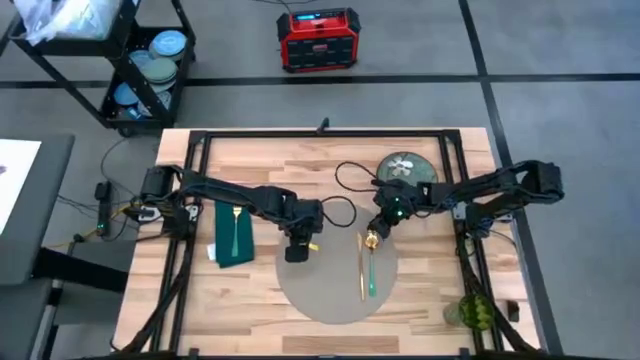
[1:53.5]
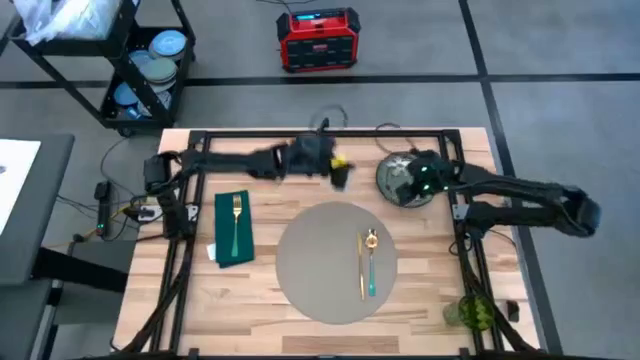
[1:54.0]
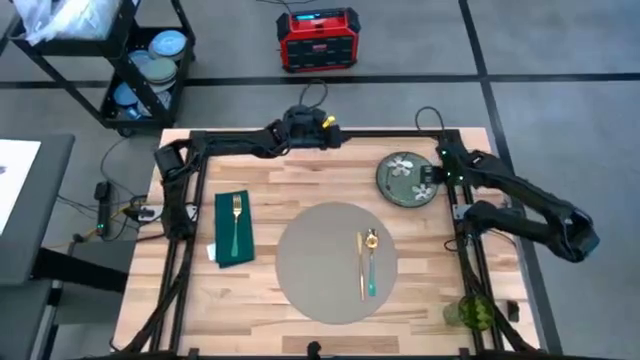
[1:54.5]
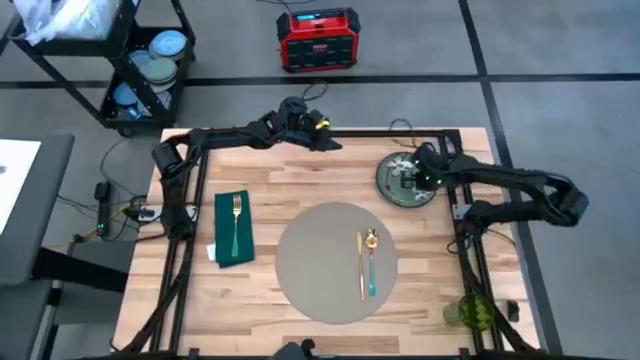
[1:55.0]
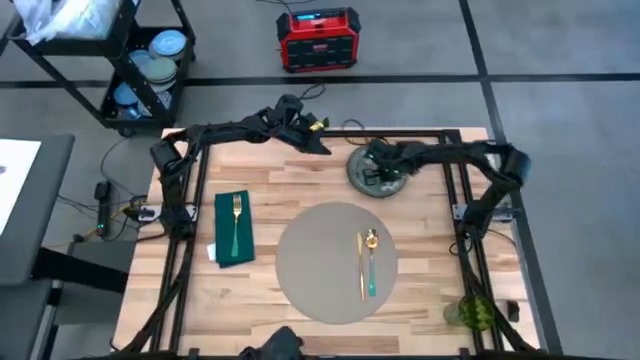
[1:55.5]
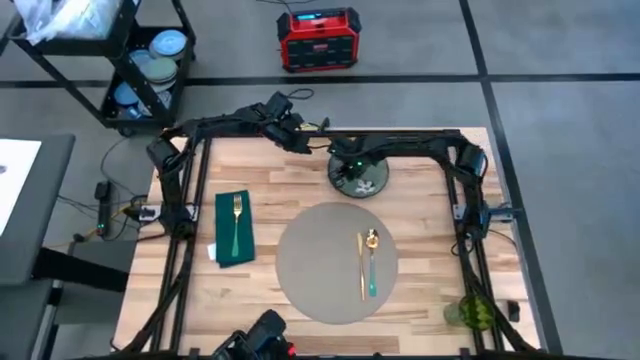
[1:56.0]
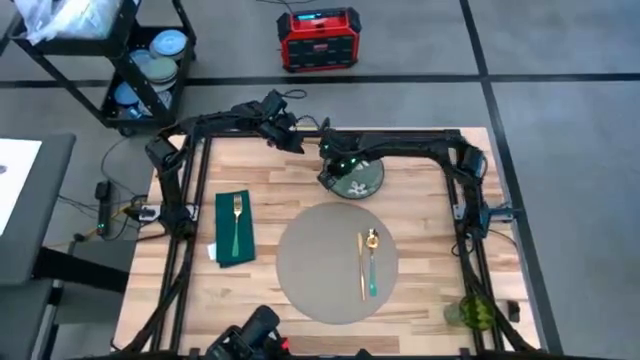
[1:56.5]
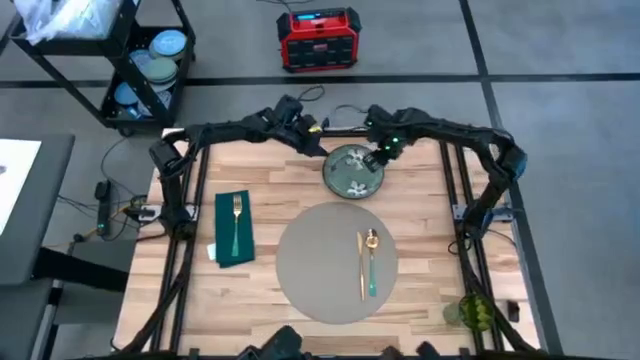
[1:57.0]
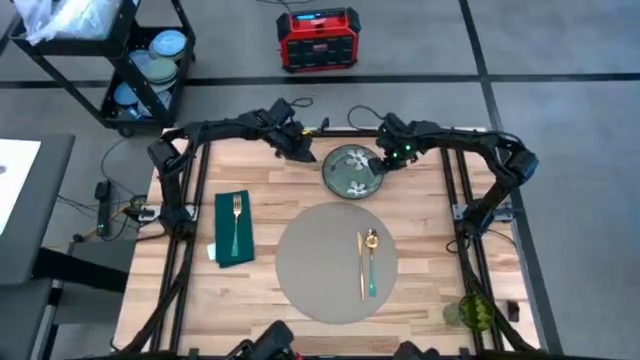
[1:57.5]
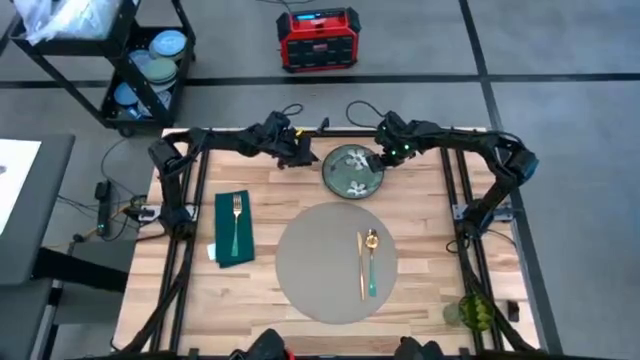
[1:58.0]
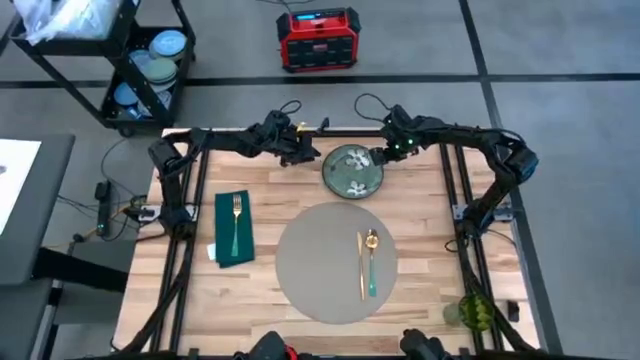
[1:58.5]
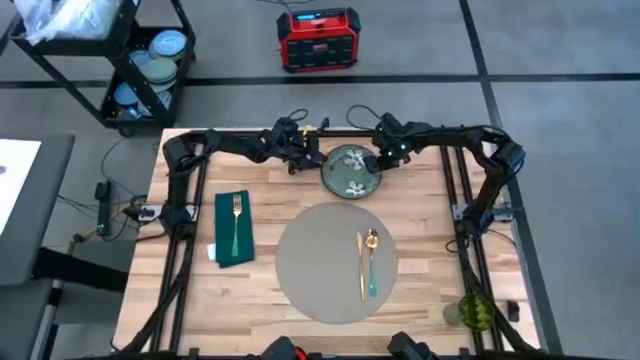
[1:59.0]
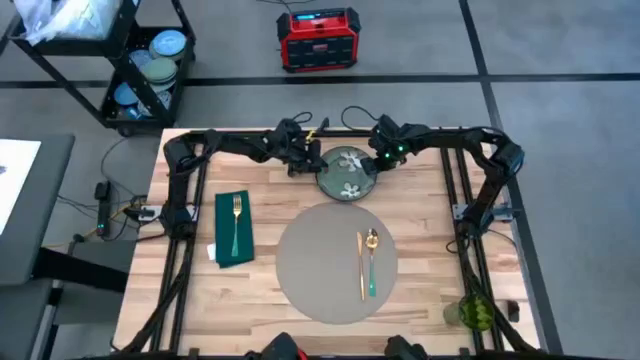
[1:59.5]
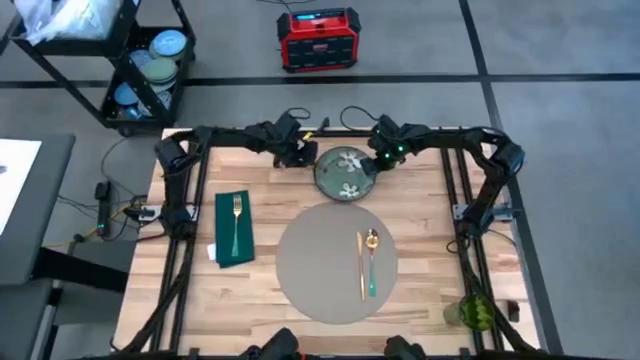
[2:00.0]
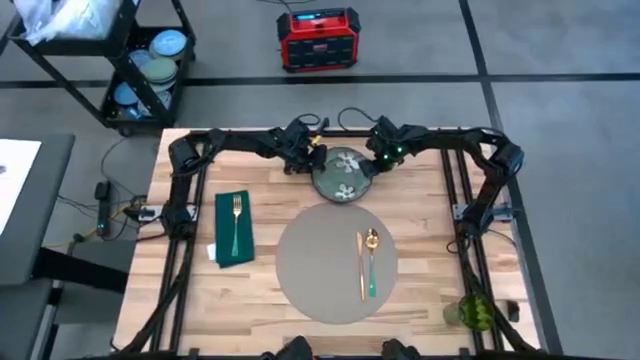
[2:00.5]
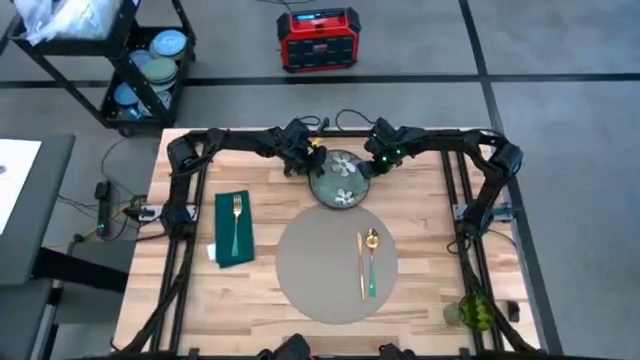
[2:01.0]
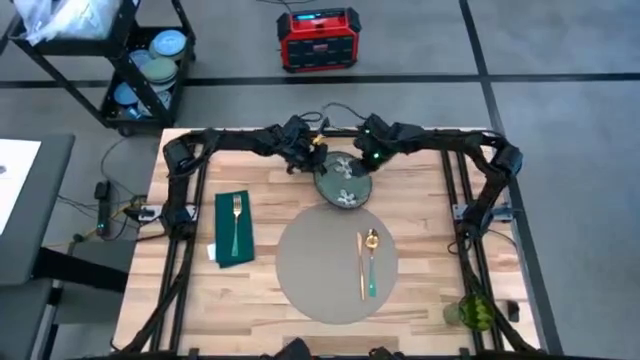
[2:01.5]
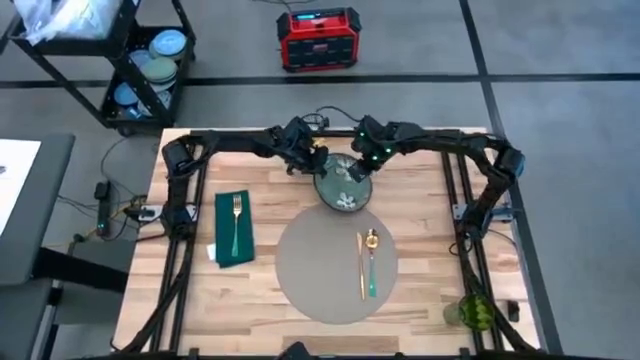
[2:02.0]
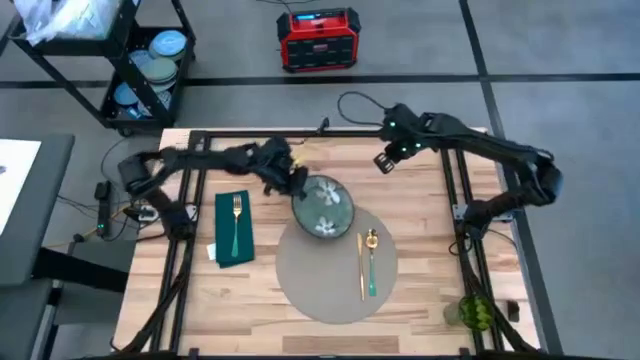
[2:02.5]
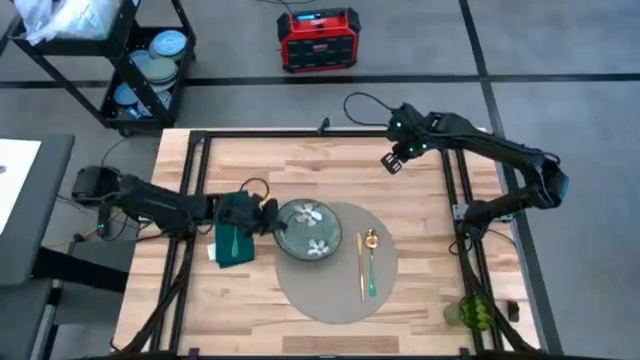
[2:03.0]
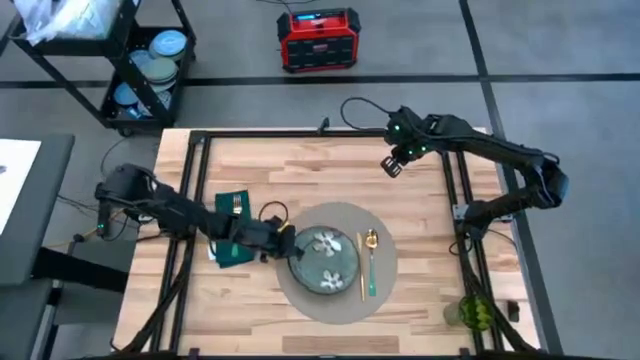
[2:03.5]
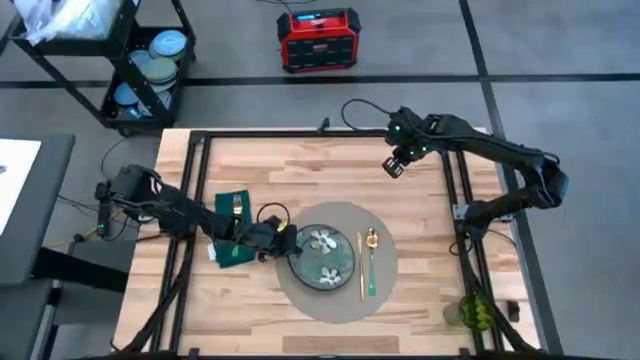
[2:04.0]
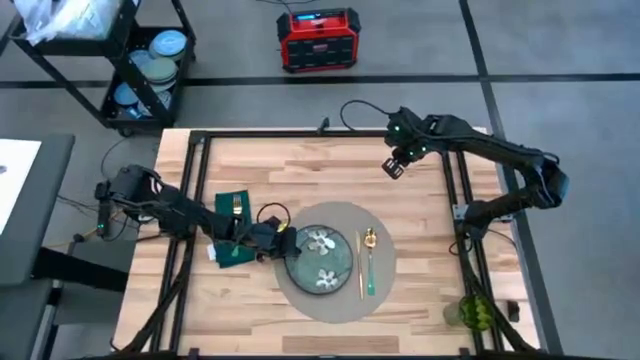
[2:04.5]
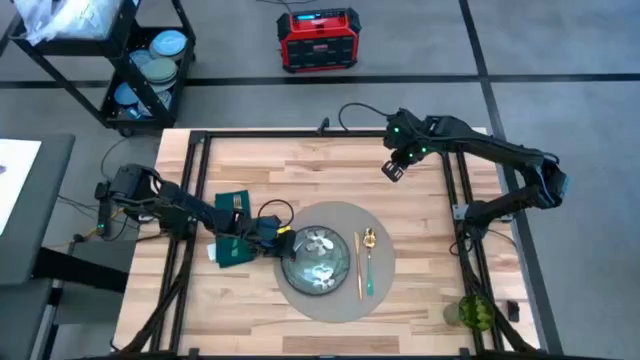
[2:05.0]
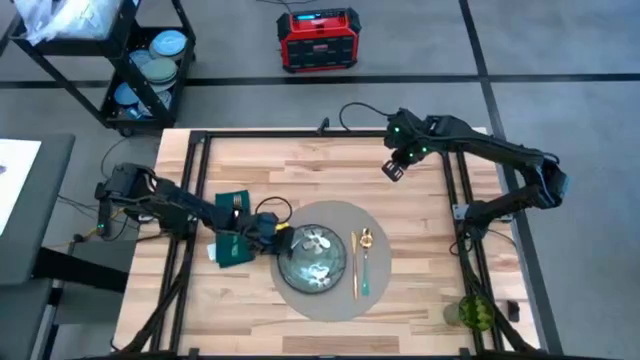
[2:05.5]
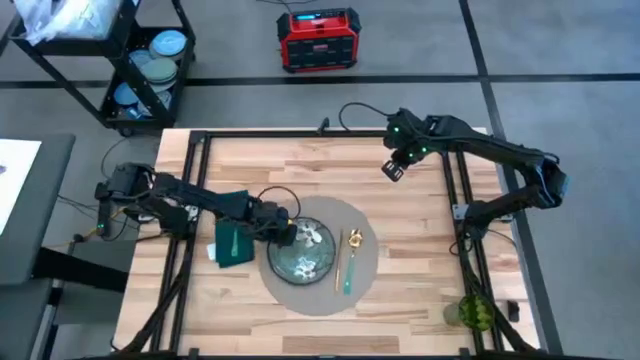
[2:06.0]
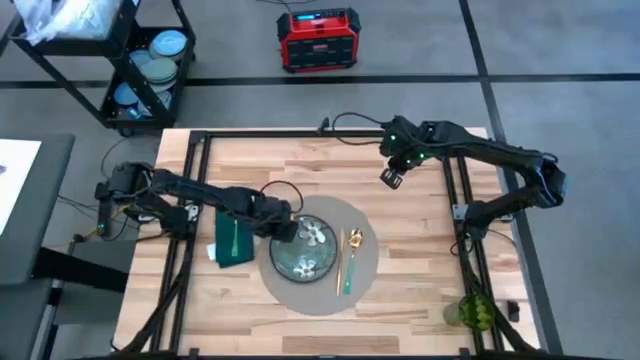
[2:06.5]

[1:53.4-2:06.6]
Task: Set table place
Put the green plate on the gray placemat

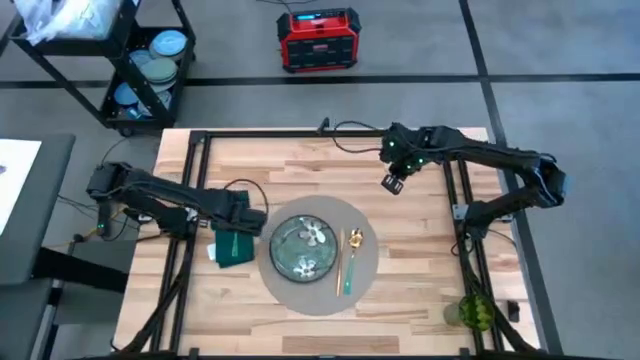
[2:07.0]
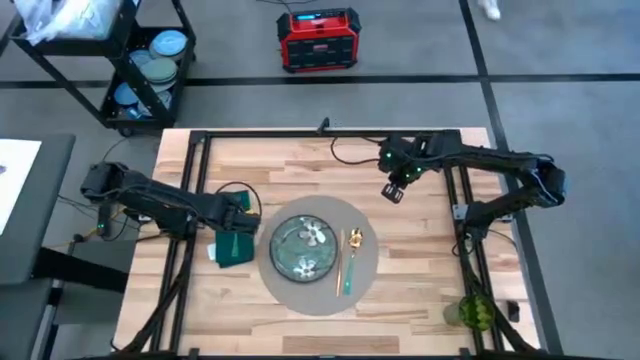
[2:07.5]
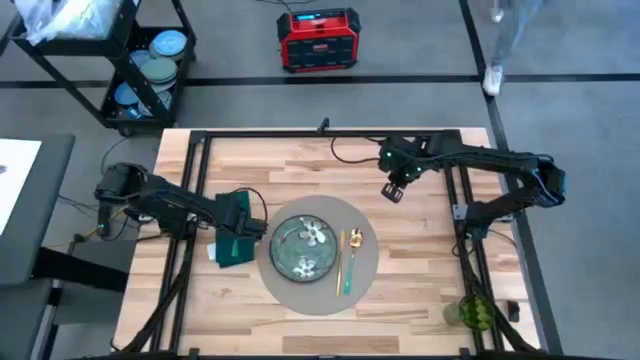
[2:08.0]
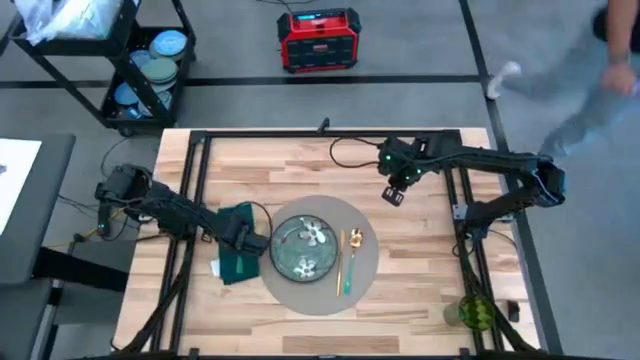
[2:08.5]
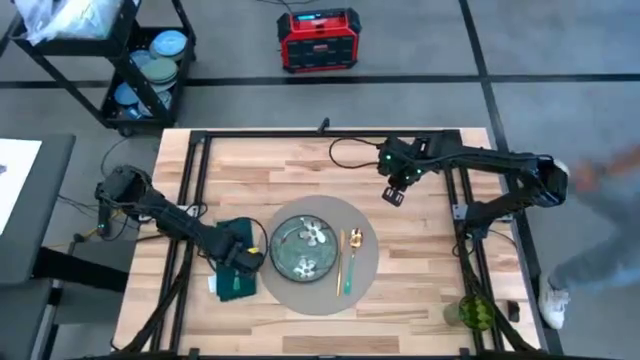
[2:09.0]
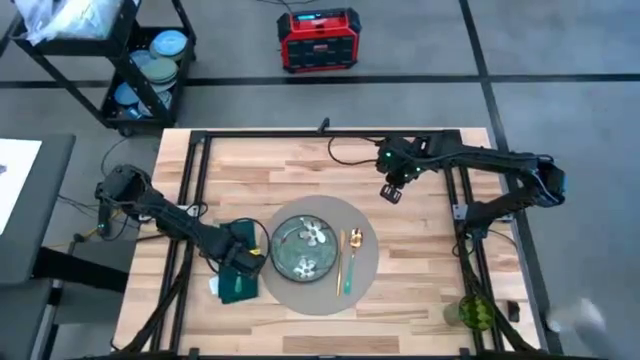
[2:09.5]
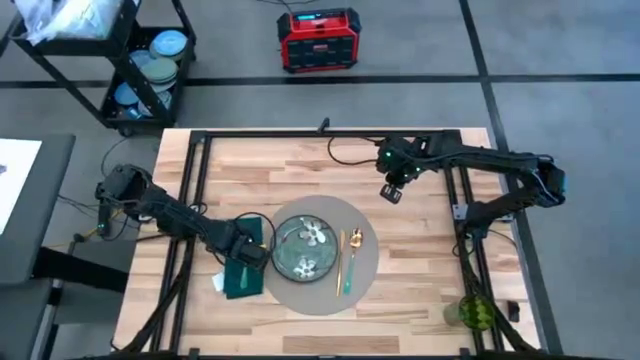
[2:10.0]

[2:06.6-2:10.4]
Adjust the green napkin

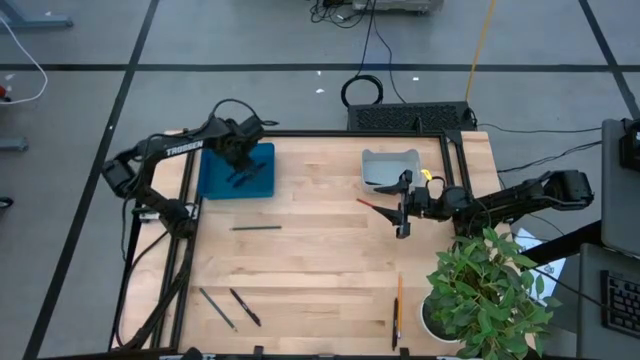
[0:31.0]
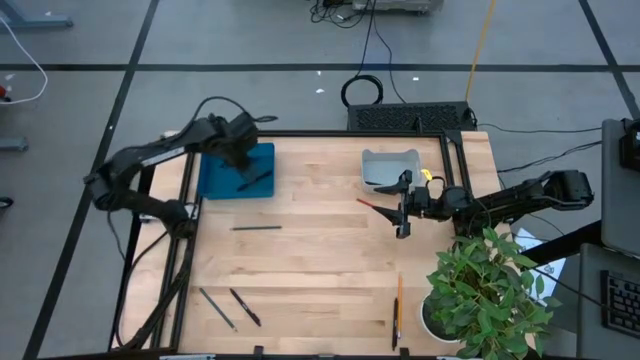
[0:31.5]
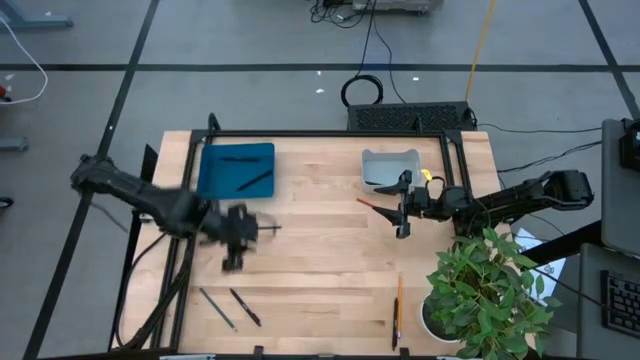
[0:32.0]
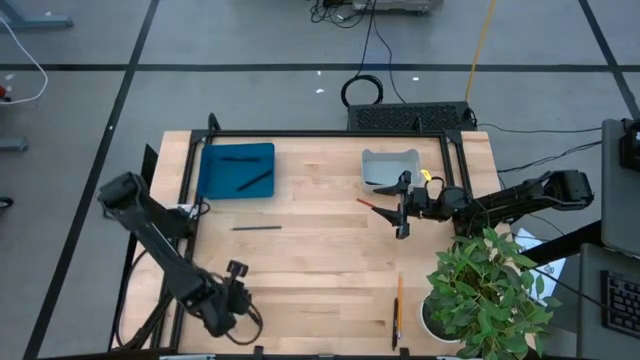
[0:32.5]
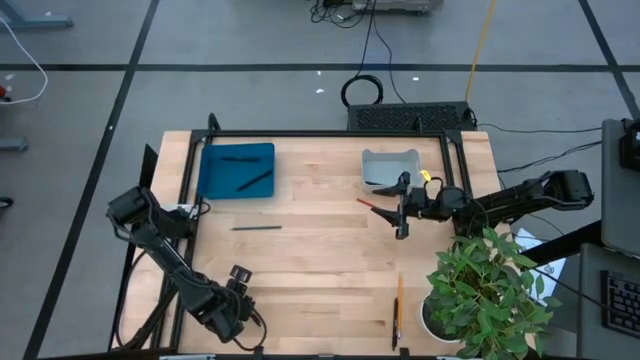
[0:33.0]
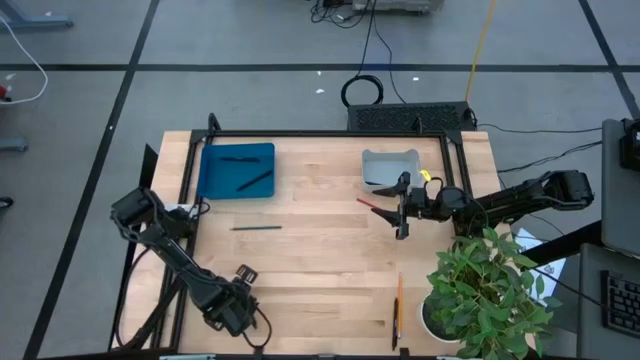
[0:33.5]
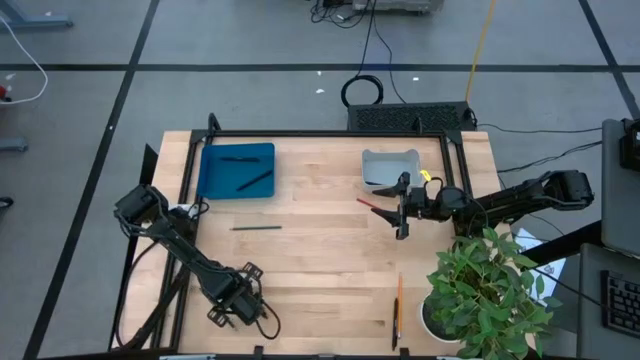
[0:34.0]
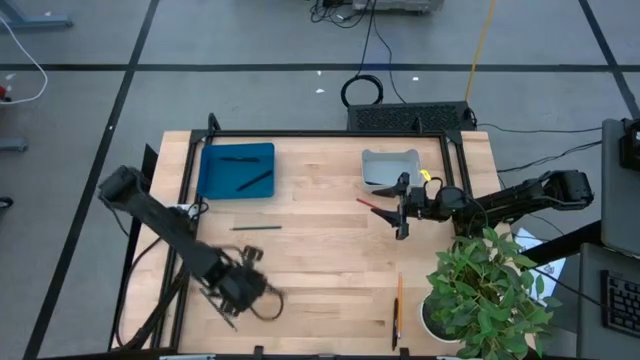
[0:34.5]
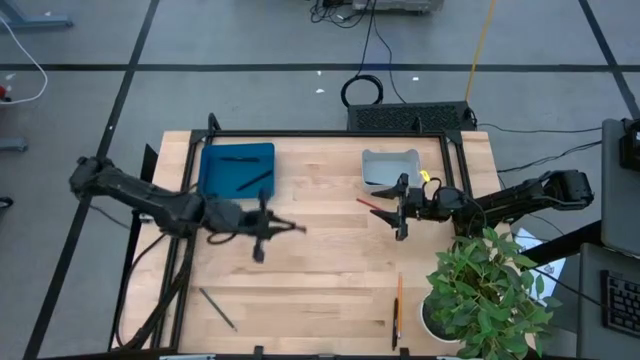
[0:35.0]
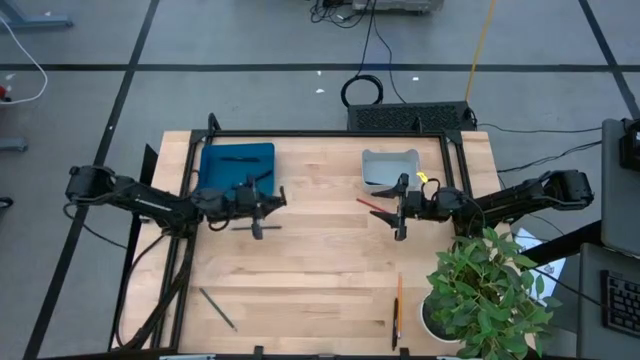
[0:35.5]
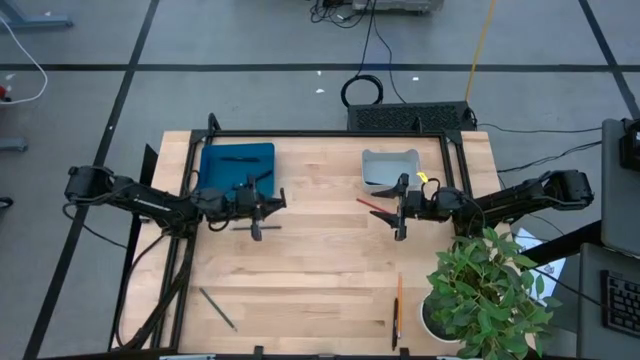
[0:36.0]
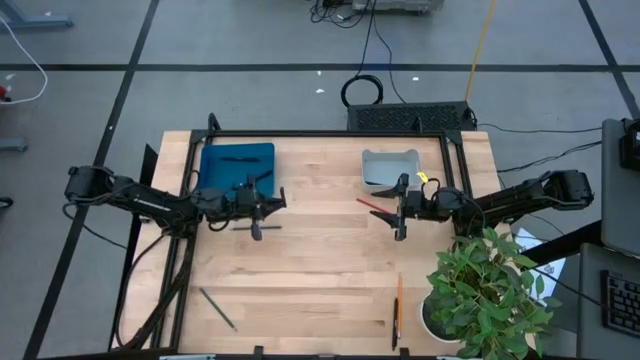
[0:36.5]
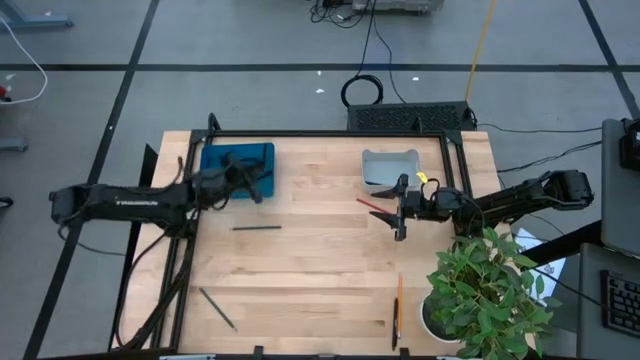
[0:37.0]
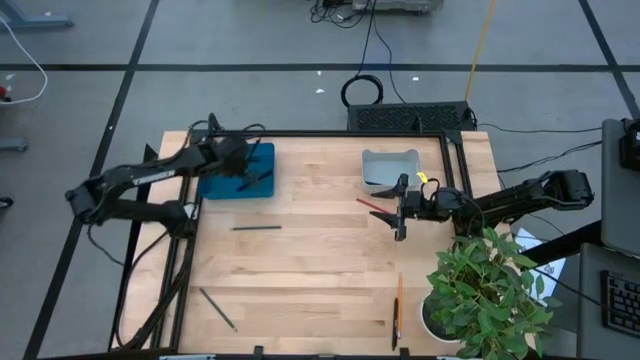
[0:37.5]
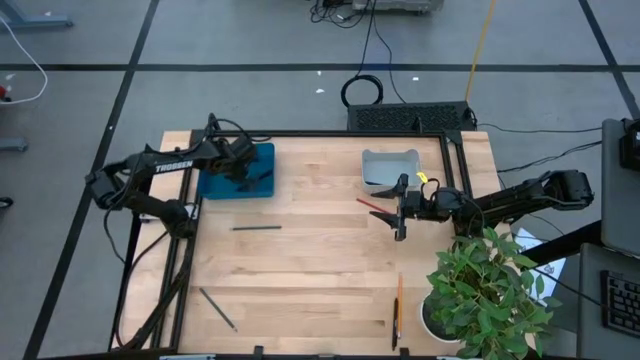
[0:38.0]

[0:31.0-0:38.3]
Task: Sort pens & pencils
Put the black pen into the blue bin
